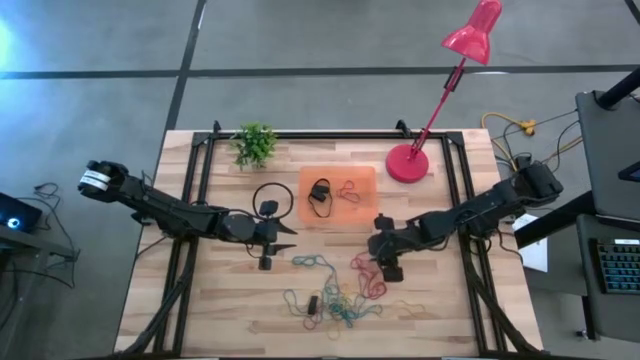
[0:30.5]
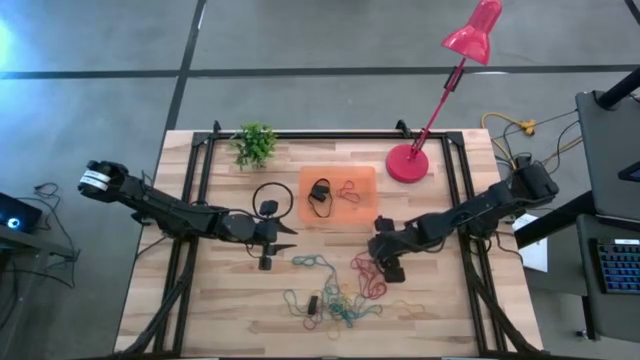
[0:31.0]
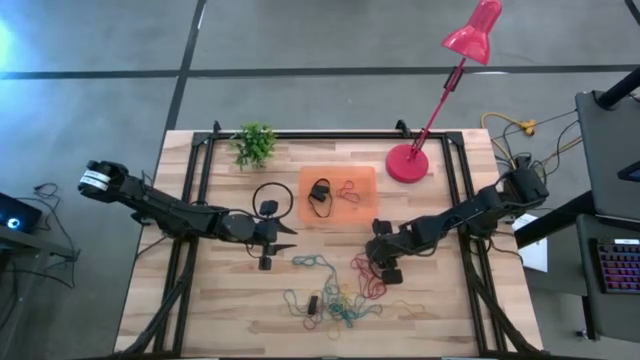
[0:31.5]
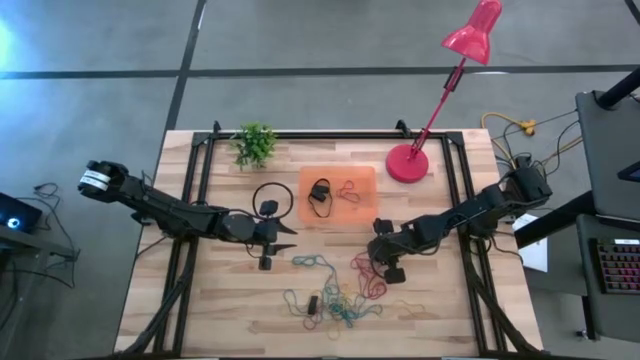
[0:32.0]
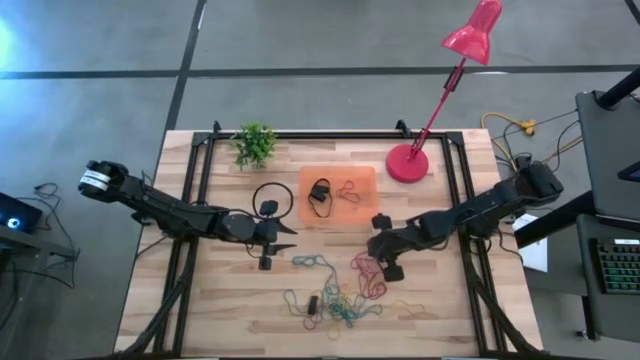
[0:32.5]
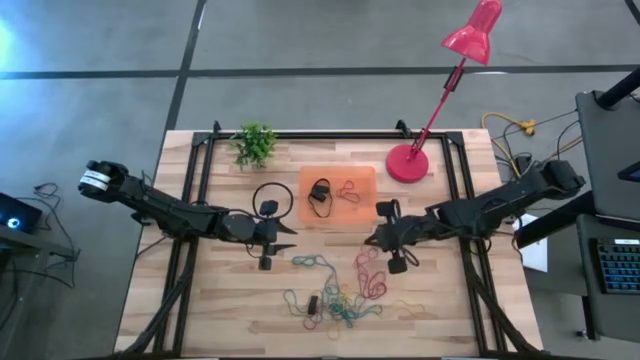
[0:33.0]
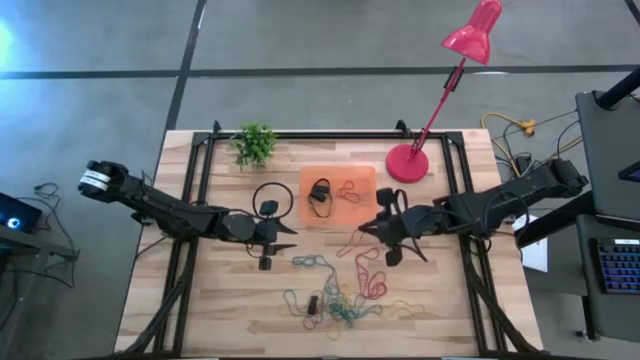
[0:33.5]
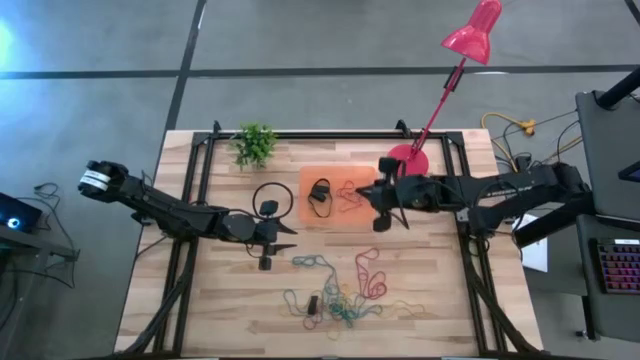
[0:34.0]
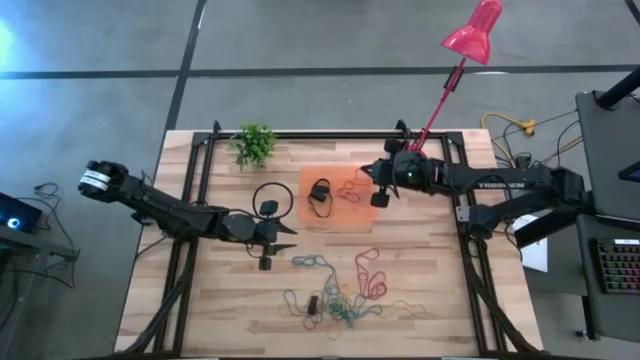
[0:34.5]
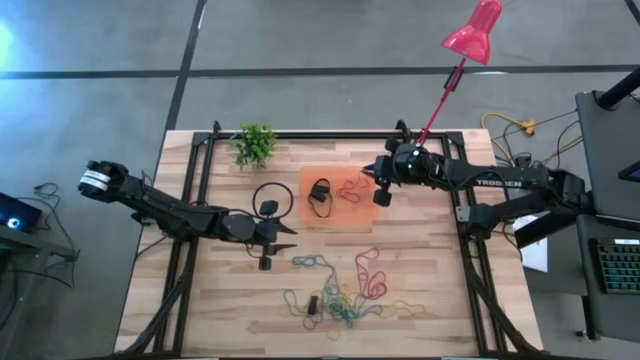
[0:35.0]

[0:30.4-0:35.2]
Task: Pick and place rubber bands into bin
Put the red rubber band into the bin

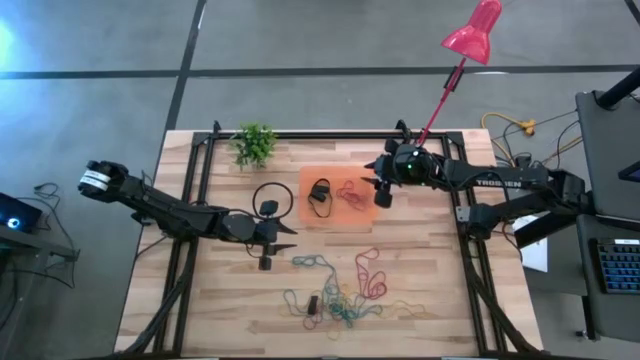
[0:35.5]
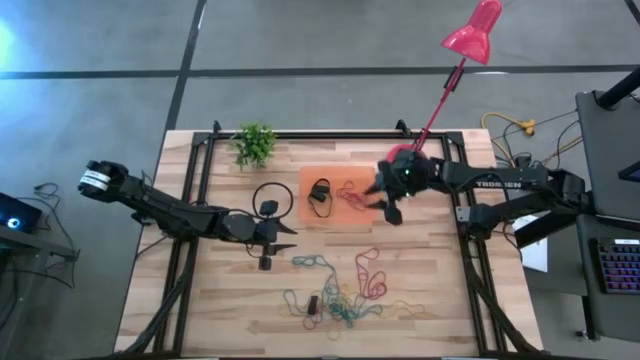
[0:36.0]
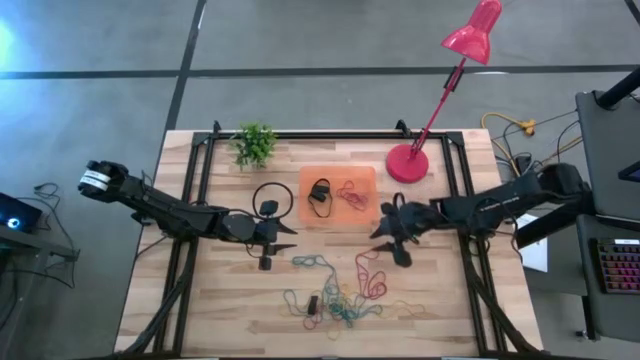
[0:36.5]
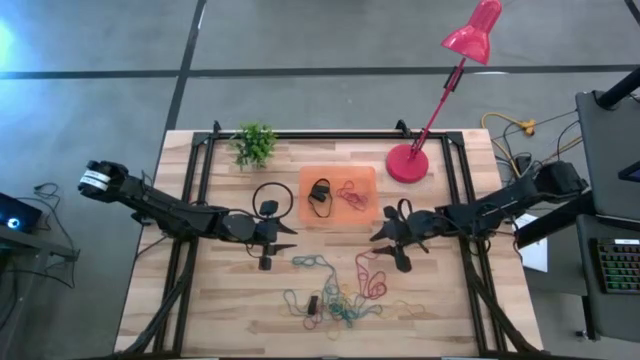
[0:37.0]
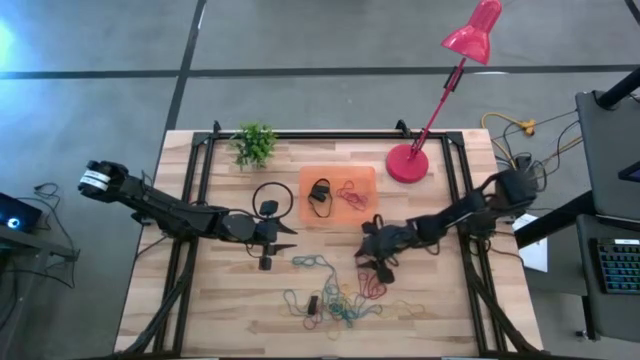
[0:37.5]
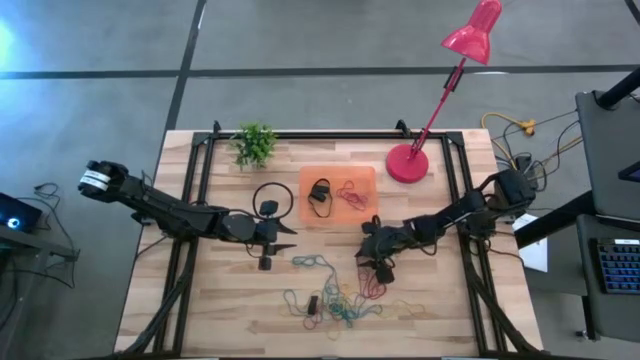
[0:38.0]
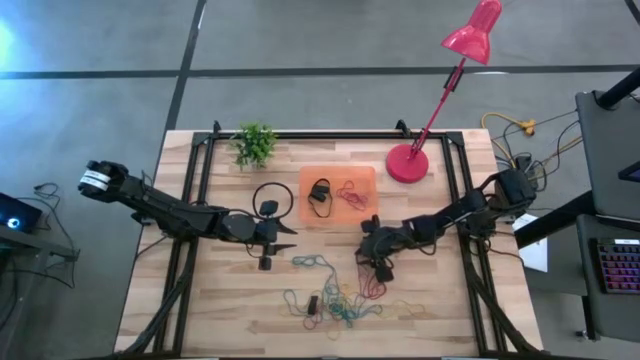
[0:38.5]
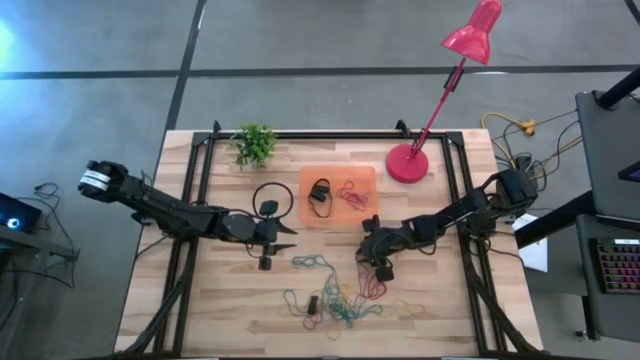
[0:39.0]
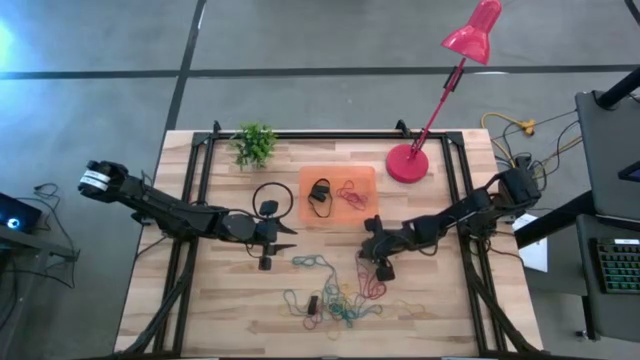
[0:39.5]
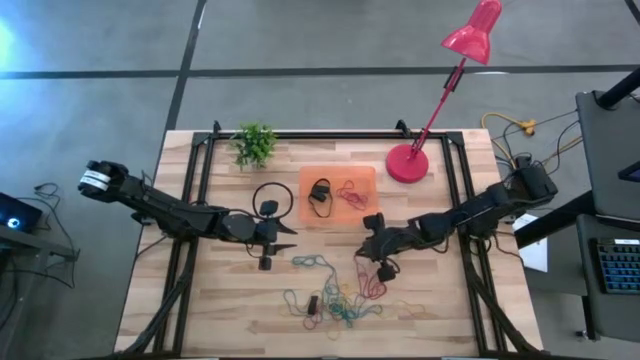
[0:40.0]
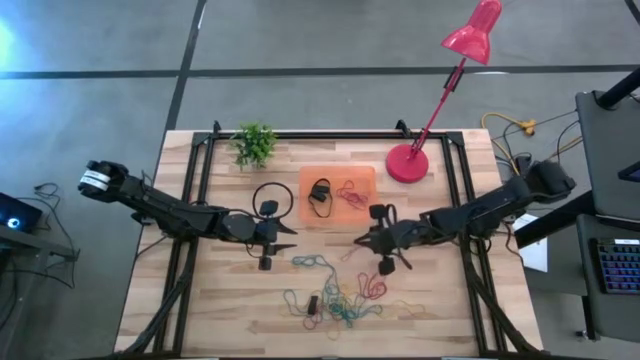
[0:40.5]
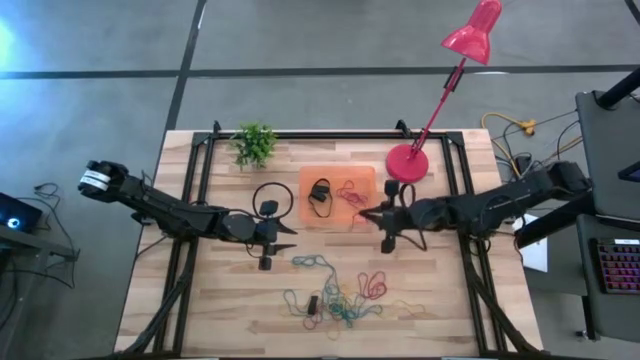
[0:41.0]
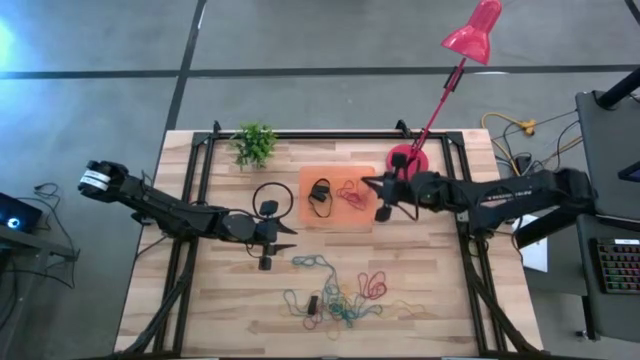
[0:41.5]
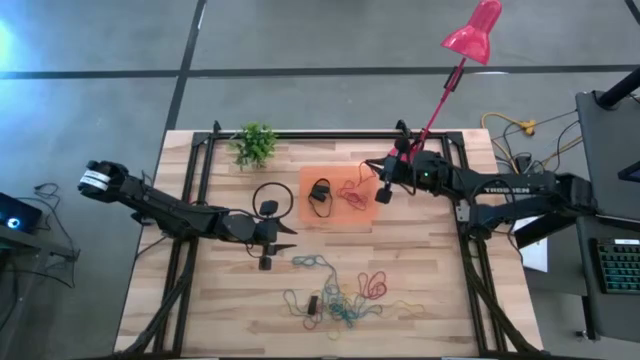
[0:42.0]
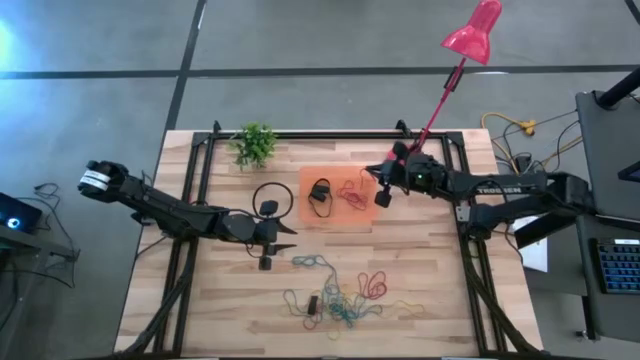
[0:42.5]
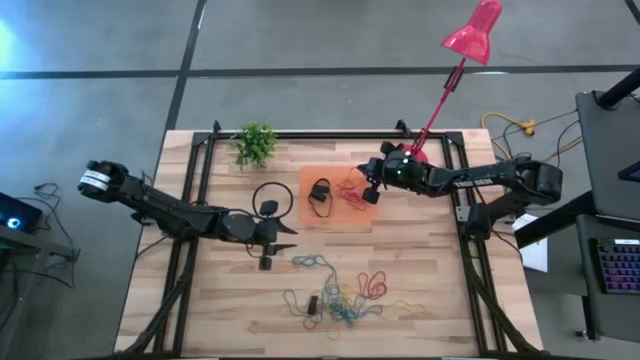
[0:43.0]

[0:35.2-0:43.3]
Put the red rubber band into the bin

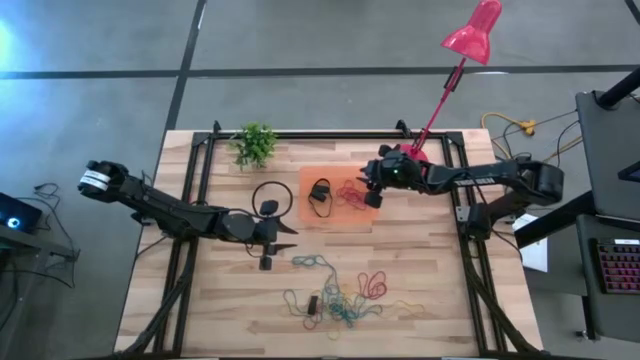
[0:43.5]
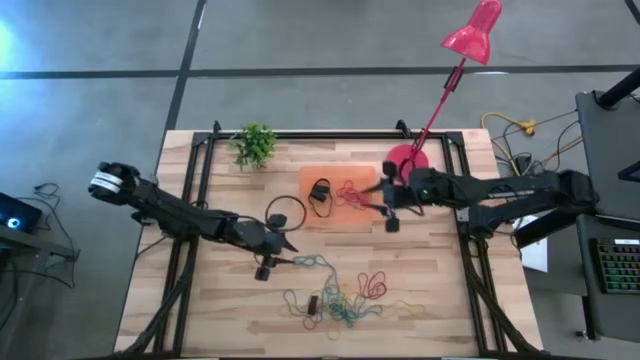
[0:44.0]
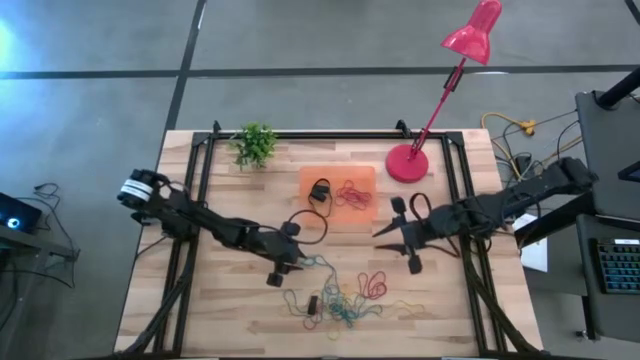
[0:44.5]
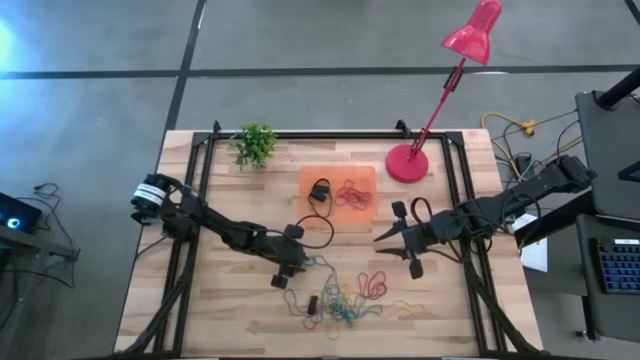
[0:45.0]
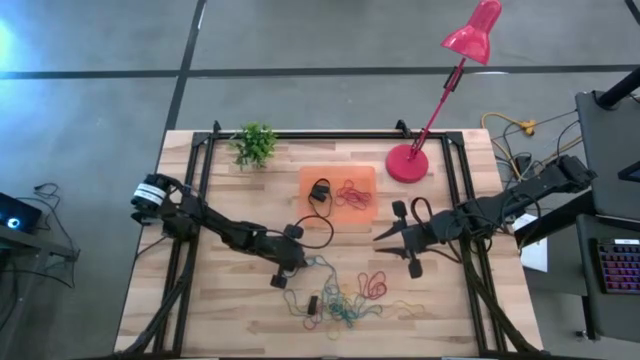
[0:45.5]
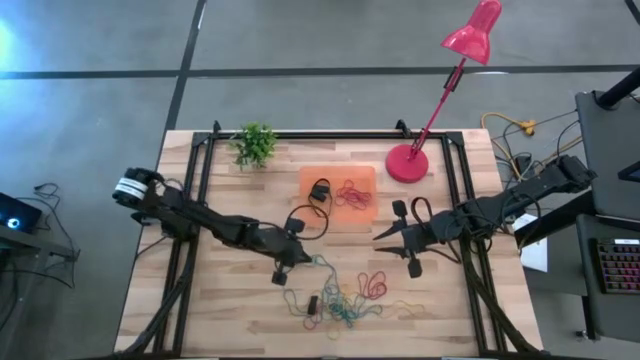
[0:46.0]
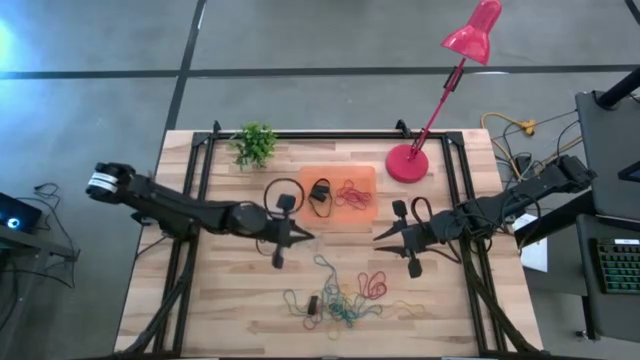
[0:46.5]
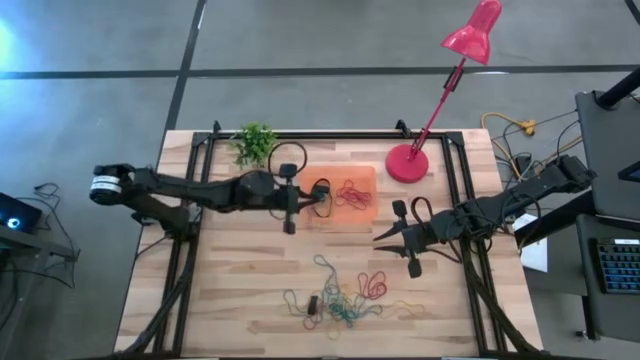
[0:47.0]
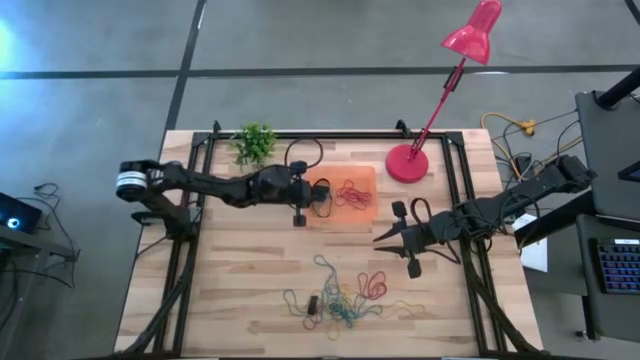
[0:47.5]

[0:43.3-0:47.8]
Put the blue rubber band into the bin

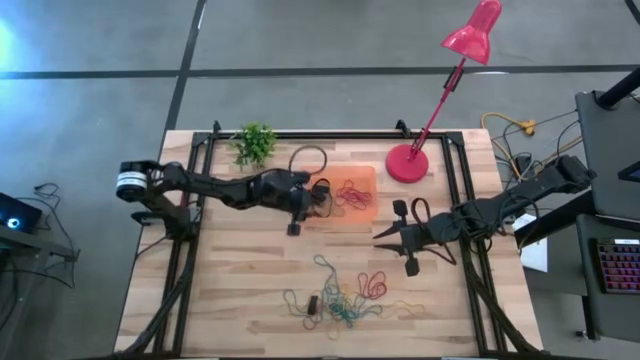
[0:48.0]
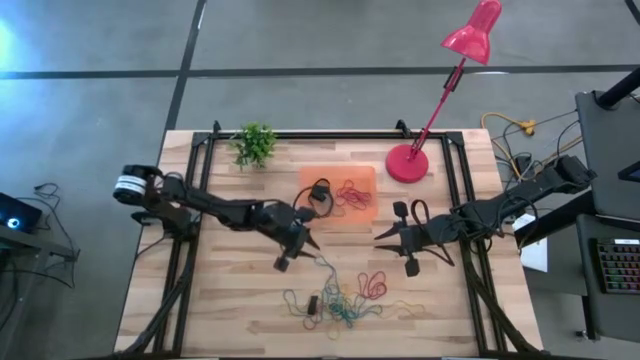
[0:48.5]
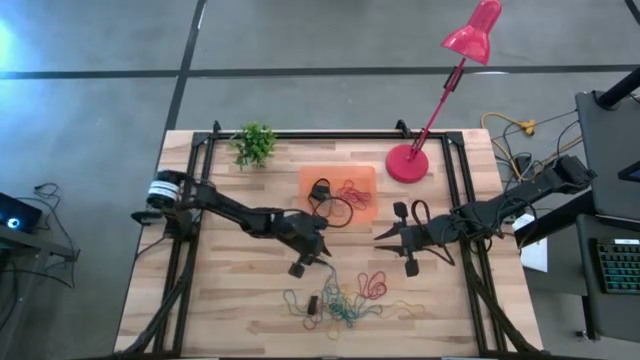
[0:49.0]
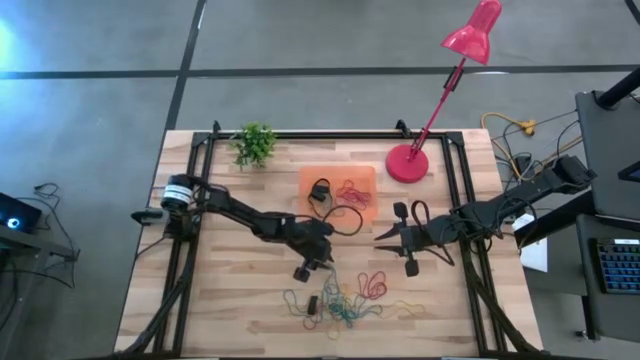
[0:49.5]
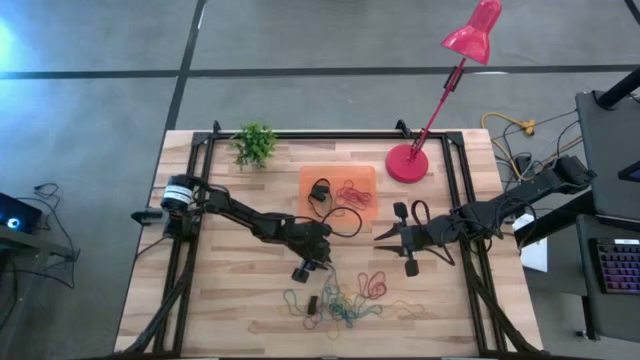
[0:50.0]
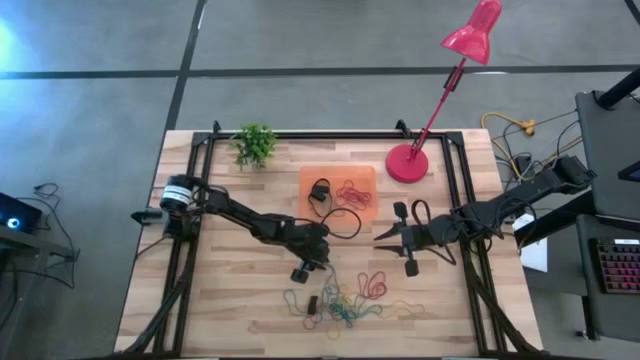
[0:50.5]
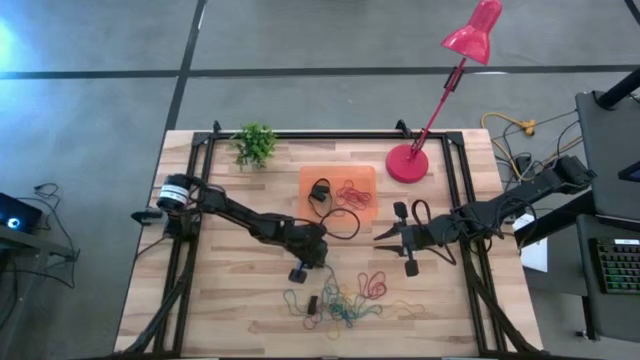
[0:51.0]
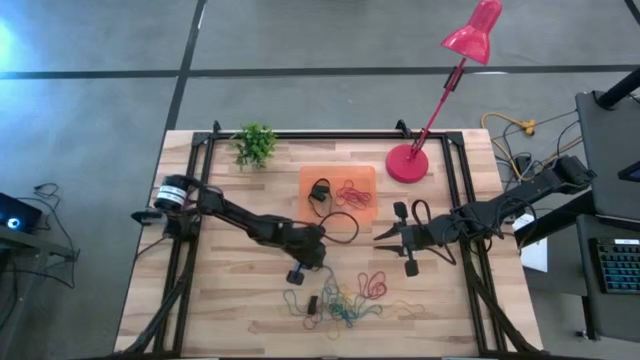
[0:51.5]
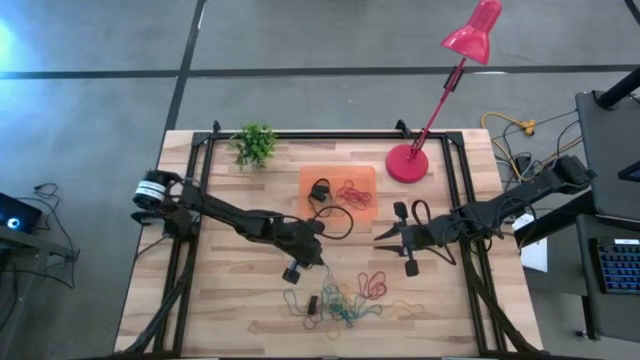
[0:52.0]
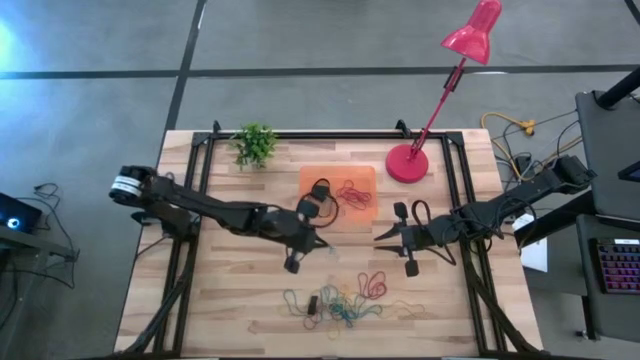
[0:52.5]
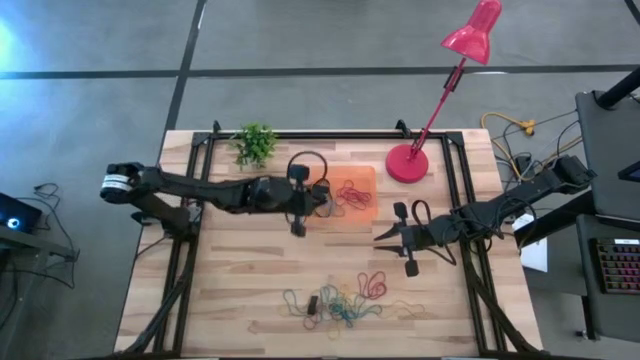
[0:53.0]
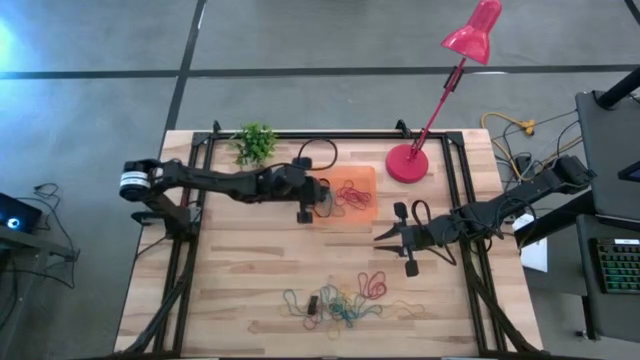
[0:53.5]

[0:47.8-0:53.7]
Put the blue rubber band into the bin
